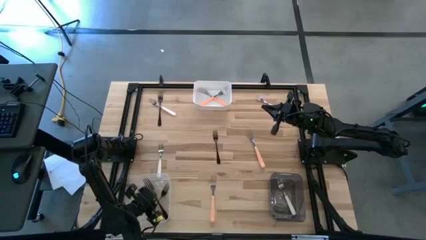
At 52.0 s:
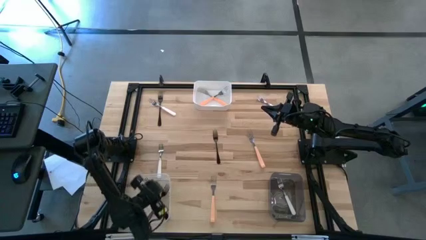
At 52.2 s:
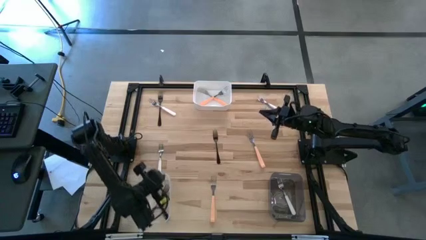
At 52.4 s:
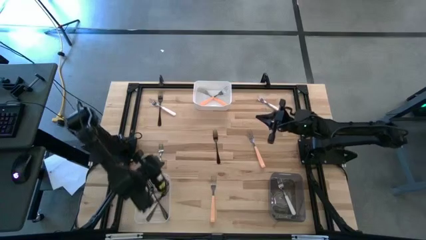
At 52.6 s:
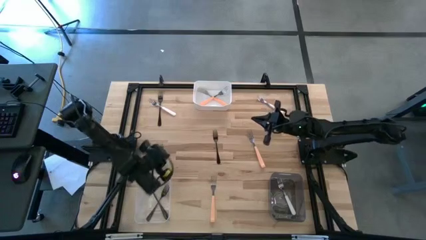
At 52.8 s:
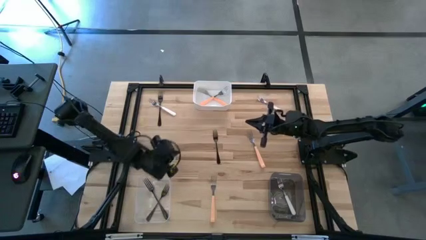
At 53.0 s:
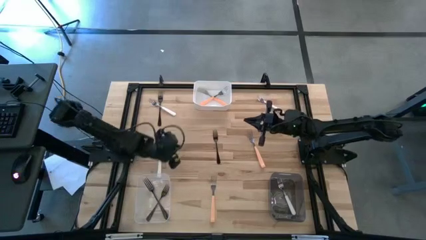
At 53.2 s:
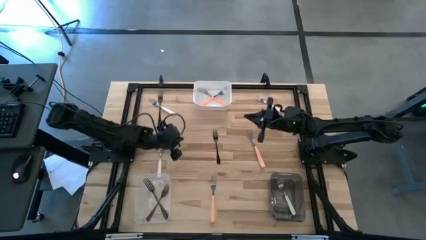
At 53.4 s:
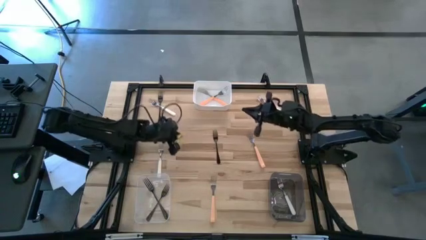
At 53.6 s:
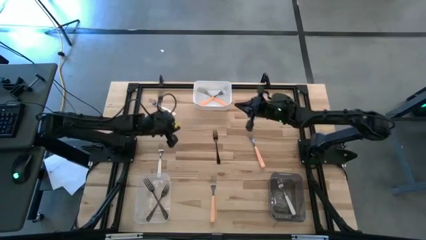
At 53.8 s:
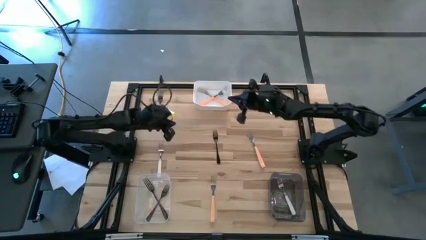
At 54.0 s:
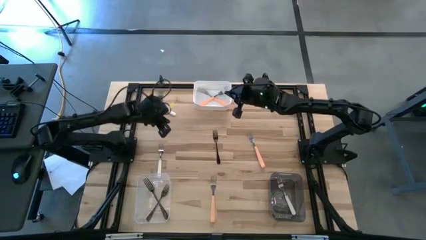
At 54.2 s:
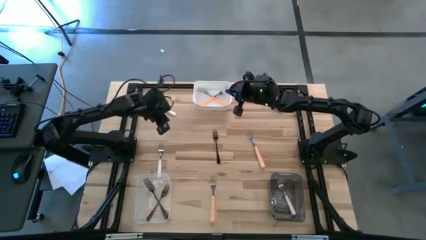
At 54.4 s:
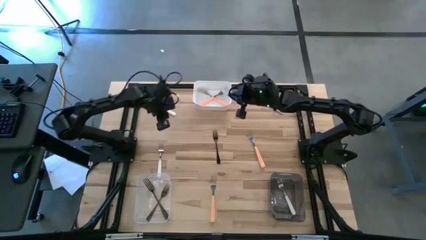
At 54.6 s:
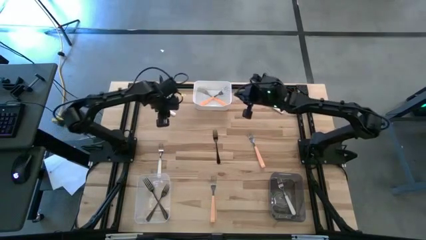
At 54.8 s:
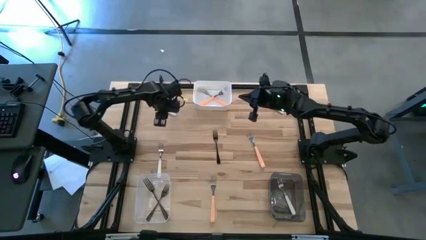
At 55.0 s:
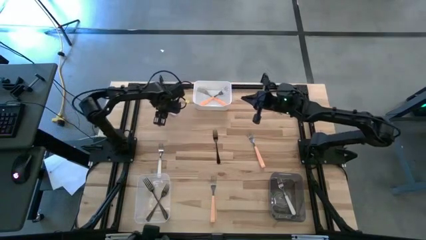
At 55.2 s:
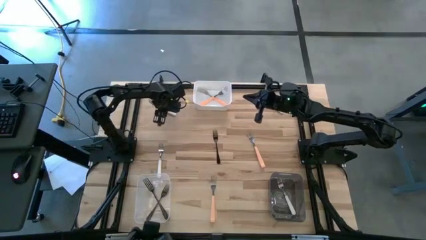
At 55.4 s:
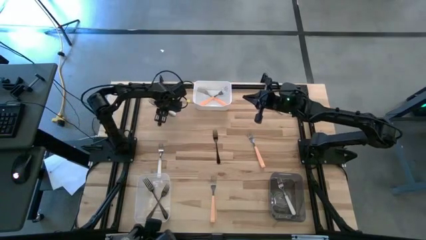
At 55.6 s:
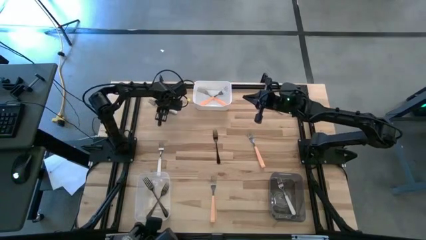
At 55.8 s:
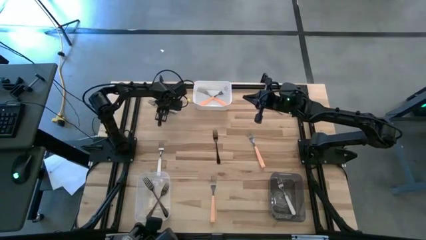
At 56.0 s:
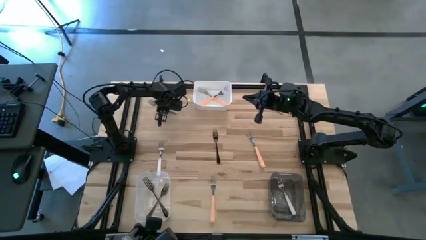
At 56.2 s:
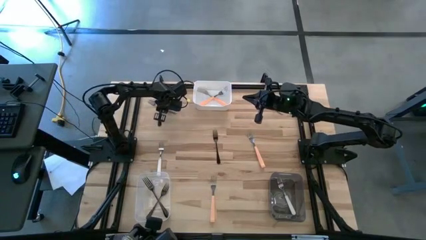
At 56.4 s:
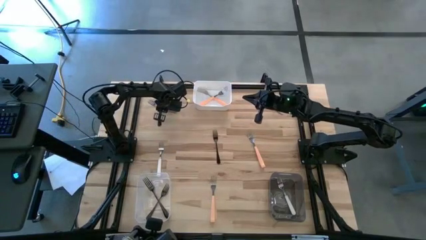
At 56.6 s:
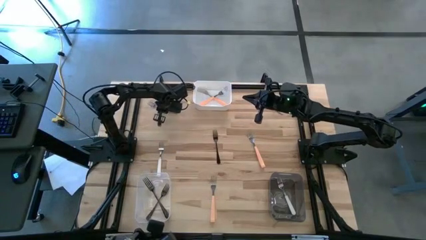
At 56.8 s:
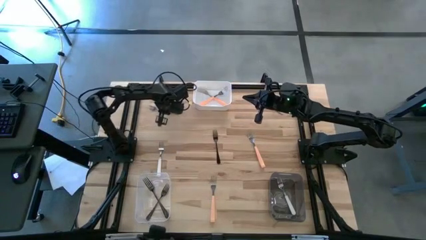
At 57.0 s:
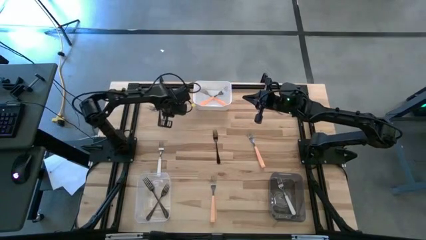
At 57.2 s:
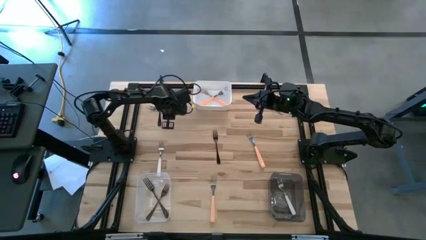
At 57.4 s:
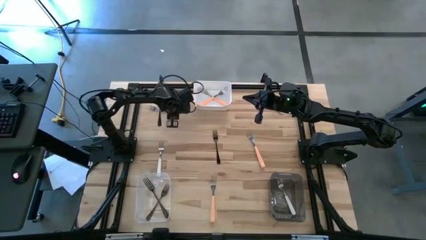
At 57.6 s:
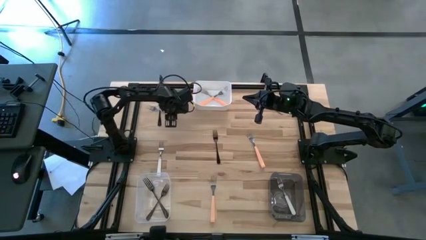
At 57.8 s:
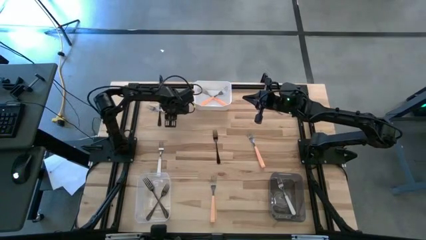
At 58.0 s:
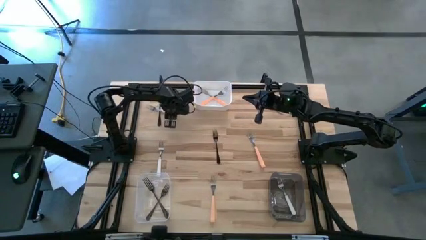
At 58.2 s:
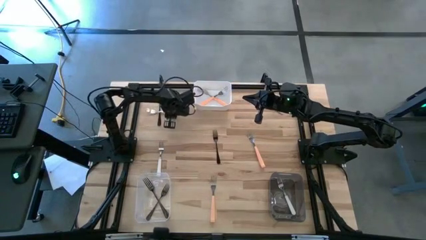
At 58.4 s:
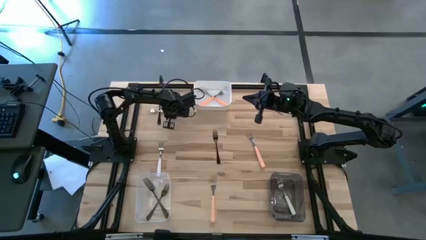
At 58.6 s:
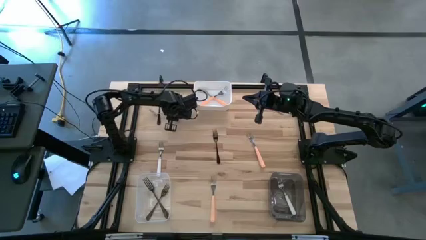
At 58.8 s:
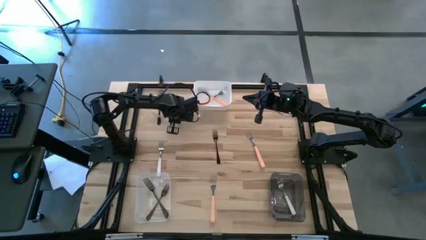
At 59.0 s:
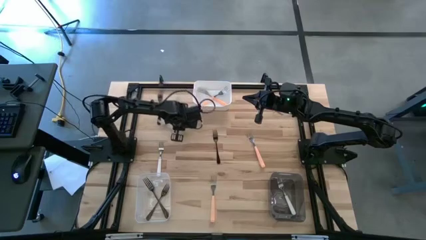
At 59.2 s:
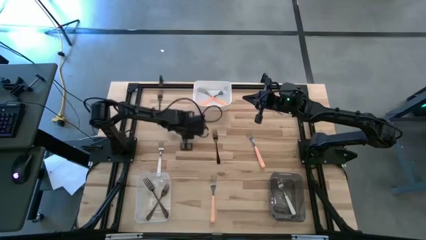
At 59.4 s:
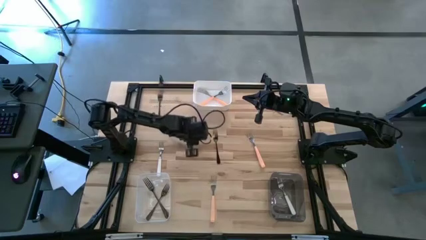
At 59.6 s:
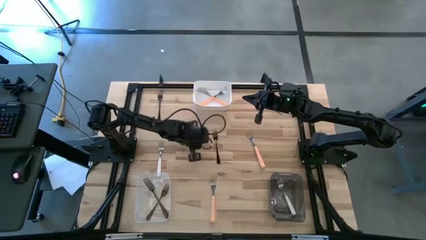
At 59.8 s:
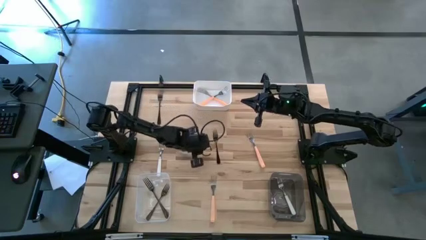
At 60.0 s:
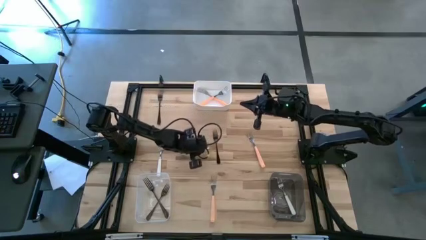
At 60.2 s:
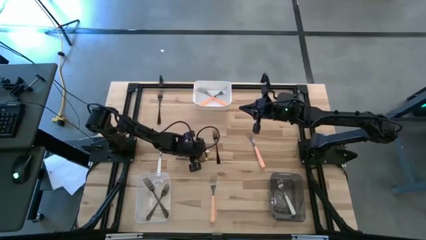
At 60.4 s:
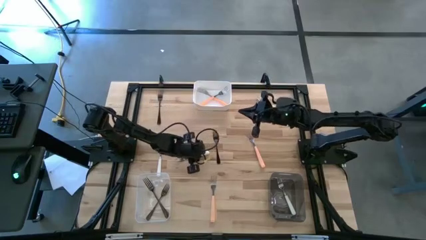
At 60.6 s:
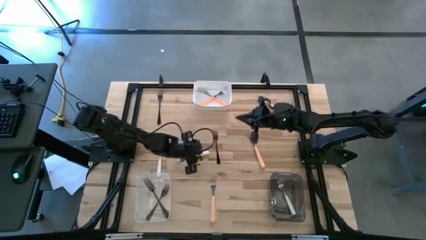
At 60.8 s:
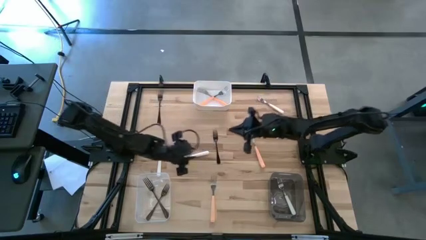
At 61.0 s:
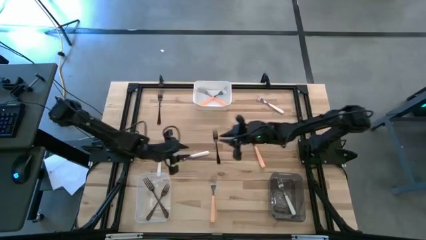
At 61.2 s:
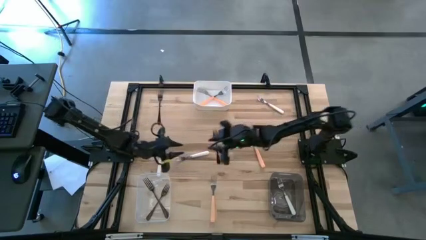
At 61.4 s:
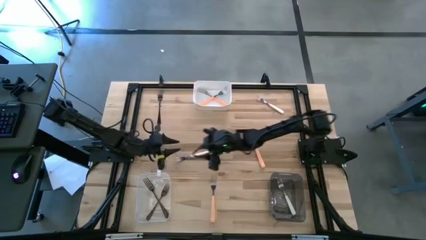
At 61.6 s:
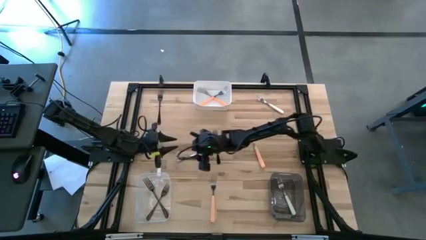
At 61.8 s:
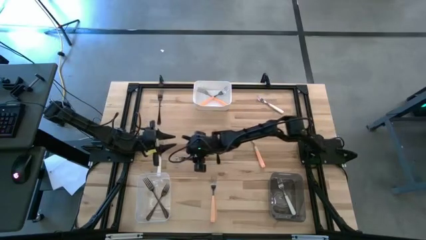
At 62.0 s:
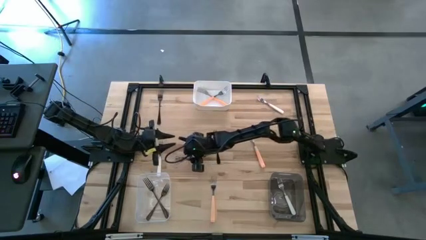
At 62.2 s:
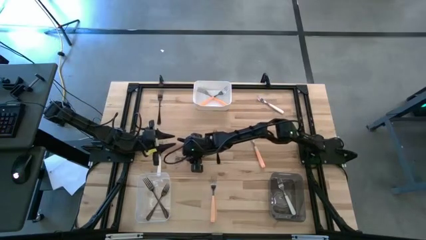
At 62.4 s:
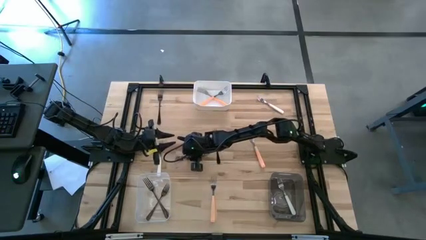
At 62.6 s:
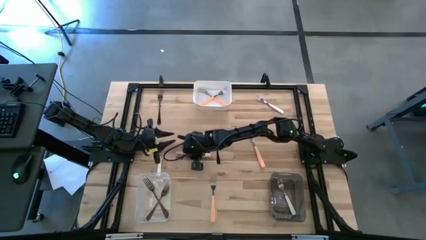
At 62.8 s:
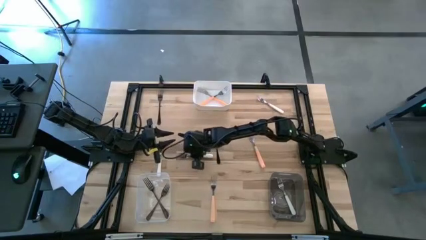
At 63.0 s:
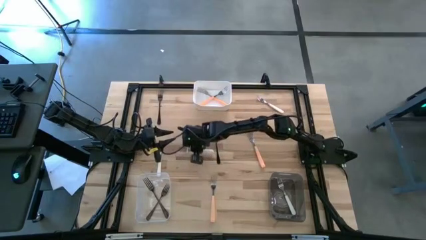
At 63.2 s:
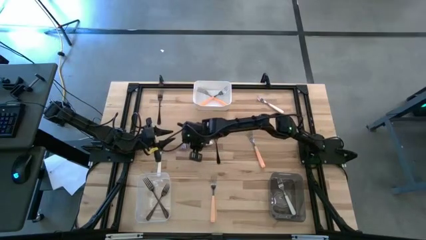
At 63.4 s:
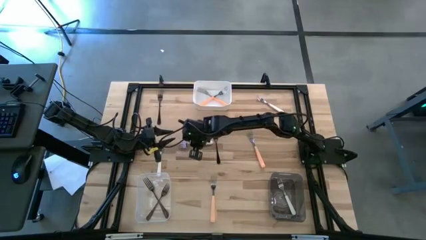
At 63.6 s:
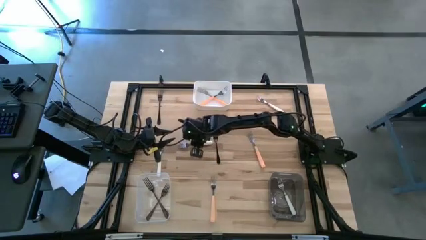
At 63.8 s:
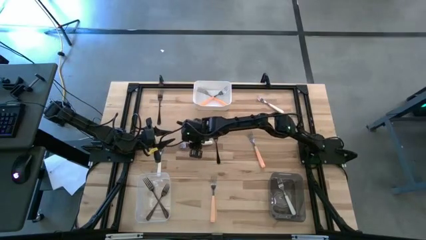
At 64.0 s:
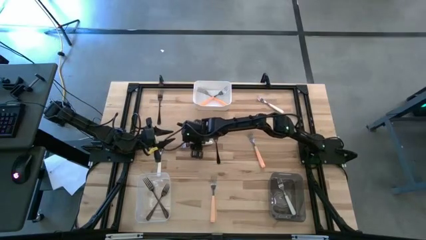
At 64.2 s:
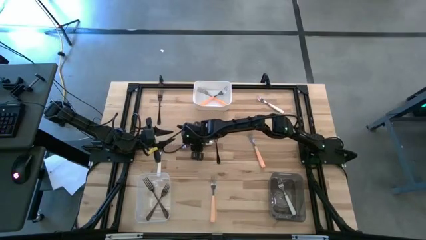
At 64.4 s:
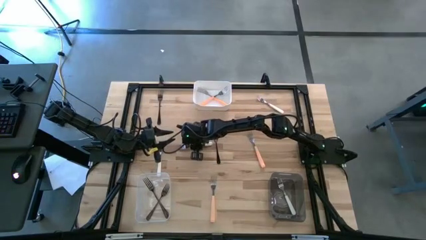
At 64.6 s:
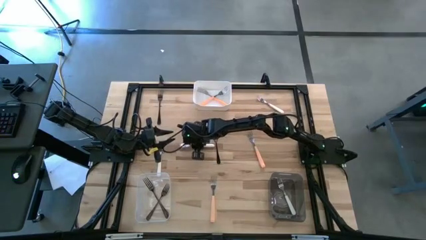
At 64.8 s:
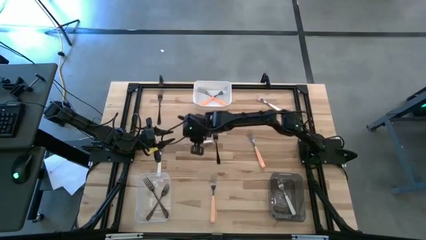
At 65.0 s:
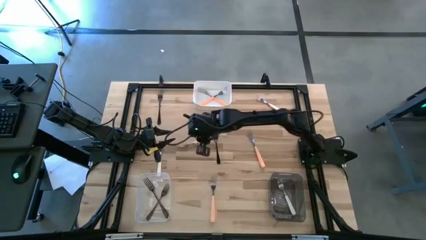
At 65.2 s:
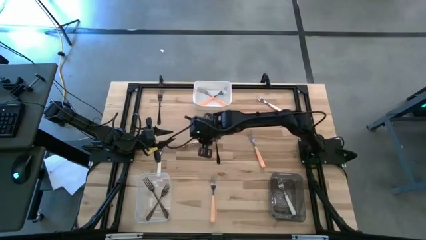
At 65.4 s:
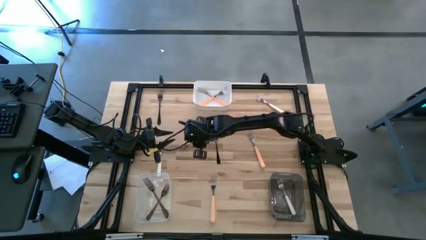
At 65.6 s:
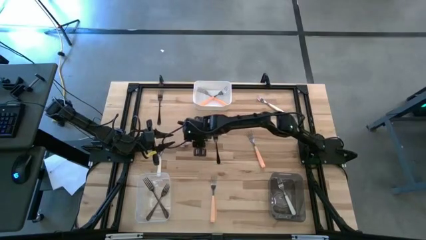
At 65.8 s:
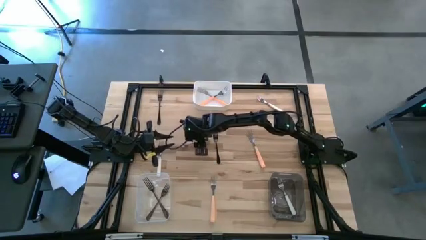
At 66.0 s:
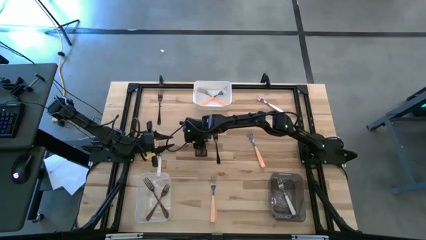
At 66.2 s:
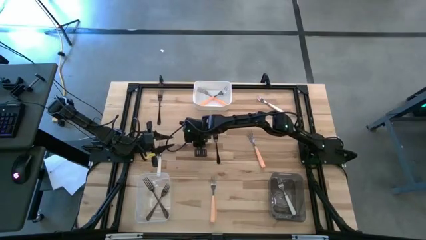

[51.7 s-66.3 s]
Task: Sort silverware by color (type)
Put the top white fork into the black bin

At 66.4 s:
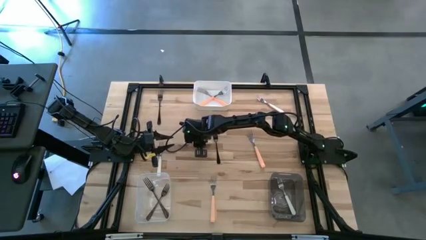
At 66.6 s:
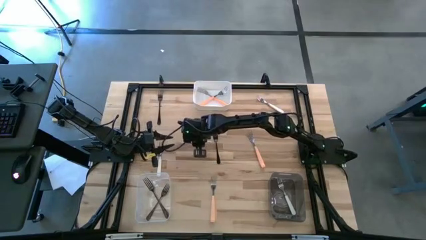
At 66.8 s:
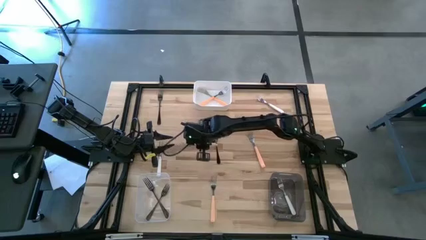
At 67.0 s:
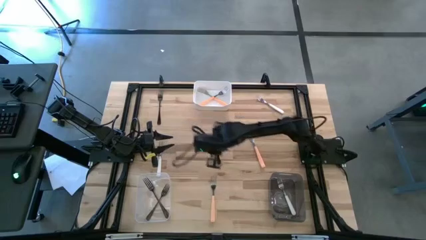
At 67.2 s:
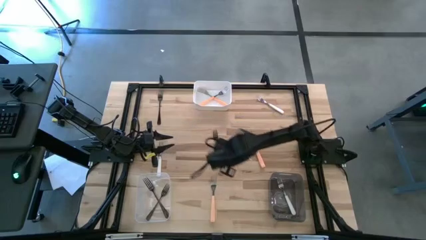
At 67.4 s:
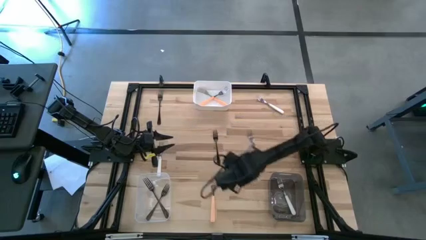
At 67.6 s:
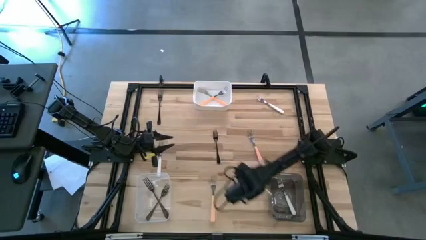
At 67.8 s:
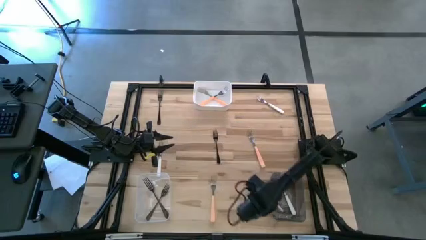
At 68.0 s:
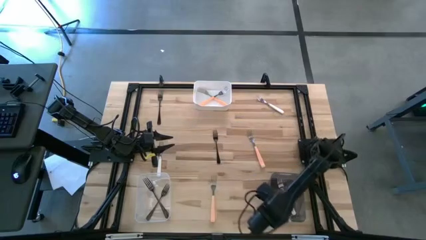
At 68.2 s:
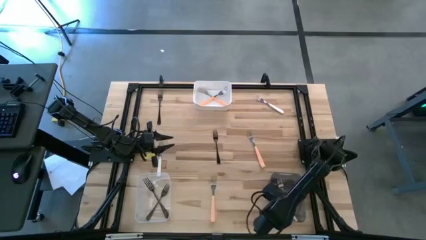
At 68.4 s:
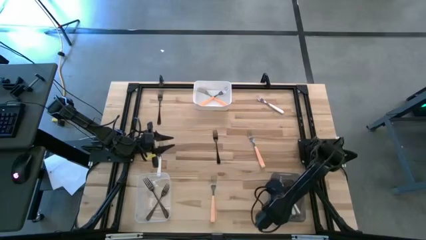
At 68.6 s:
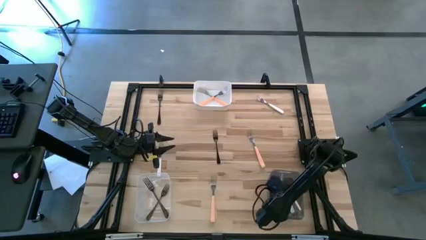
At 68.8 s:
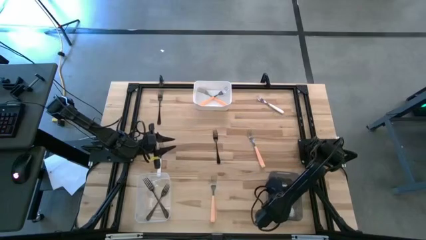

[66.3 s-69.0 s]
Put the top white fork into the black bin
